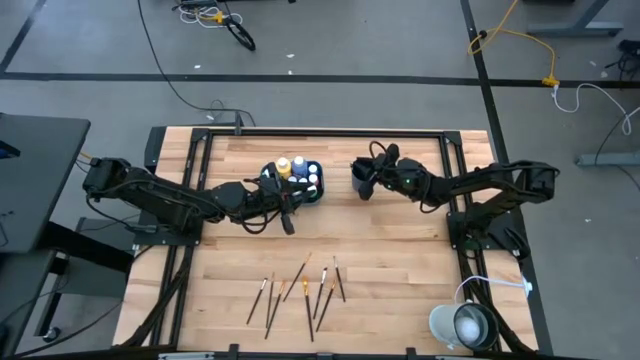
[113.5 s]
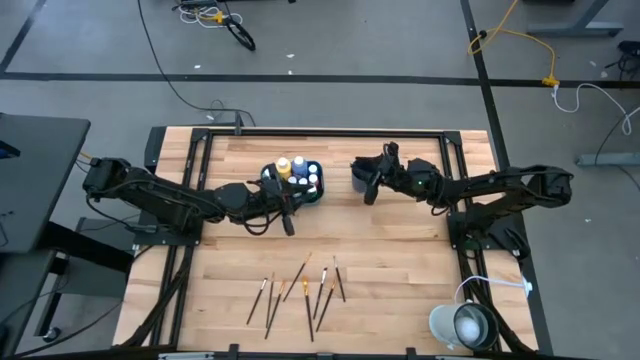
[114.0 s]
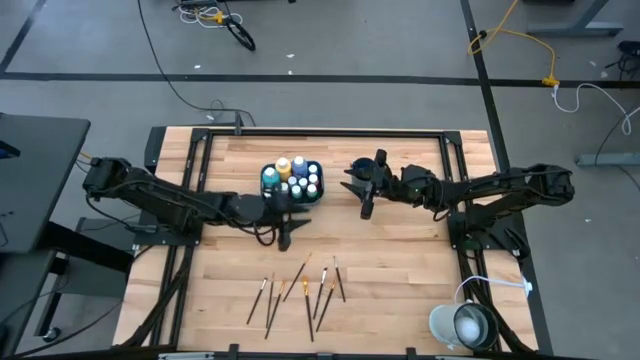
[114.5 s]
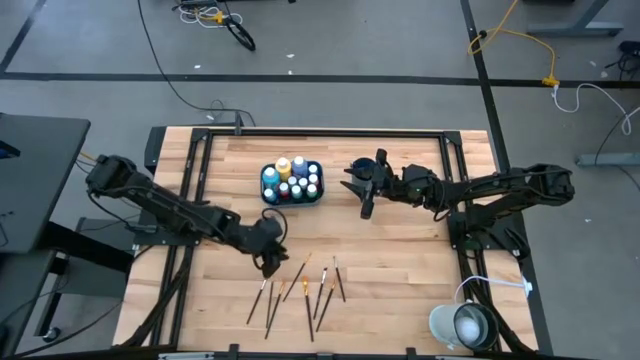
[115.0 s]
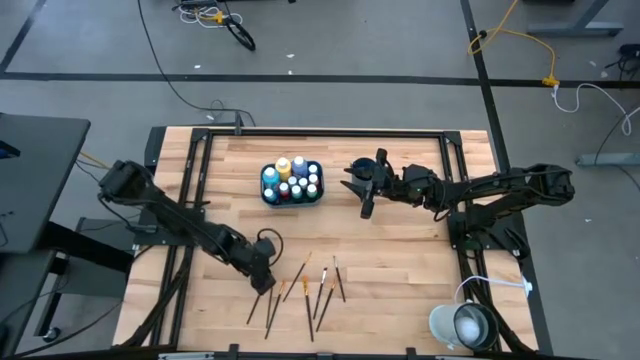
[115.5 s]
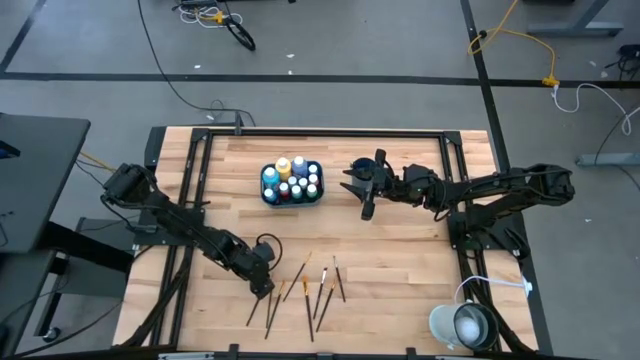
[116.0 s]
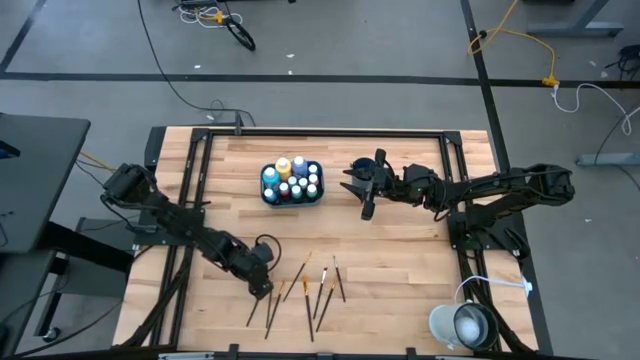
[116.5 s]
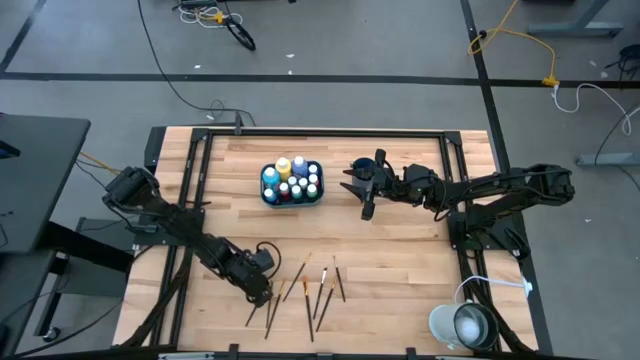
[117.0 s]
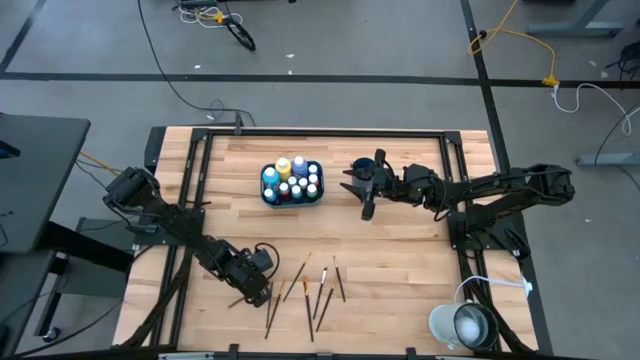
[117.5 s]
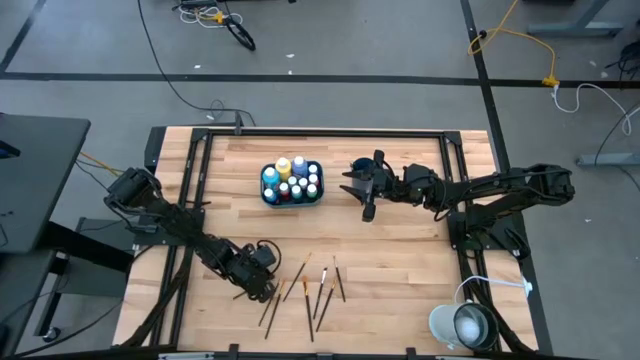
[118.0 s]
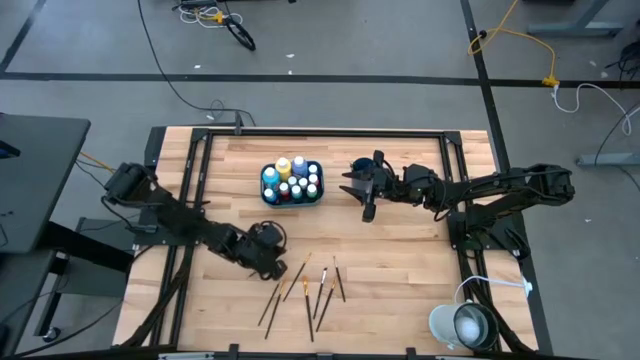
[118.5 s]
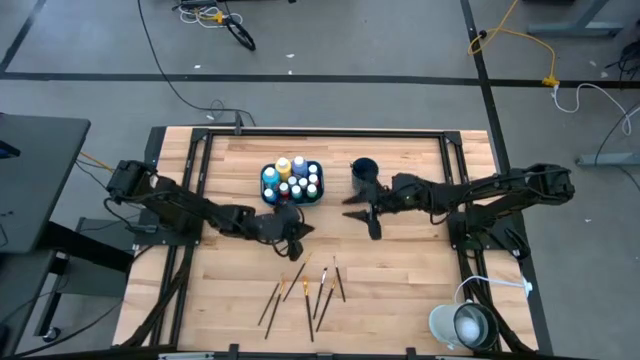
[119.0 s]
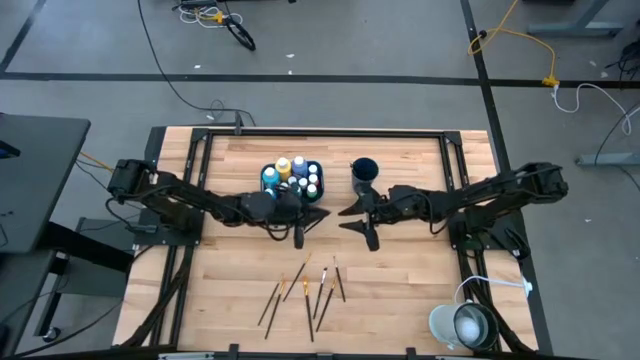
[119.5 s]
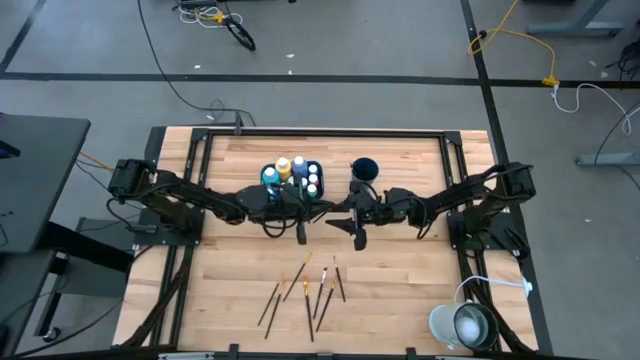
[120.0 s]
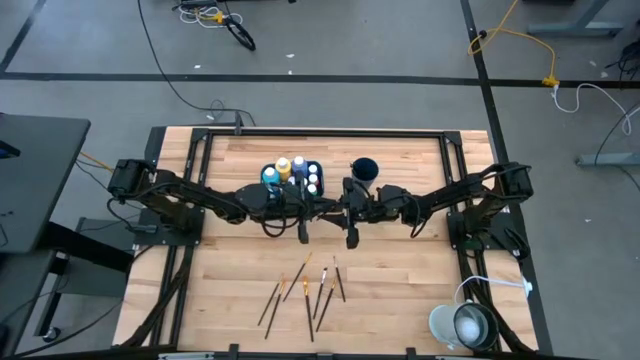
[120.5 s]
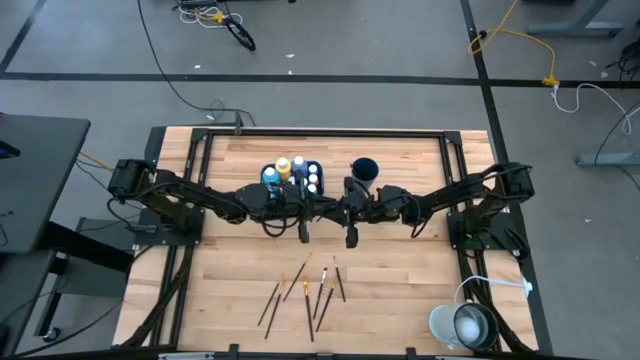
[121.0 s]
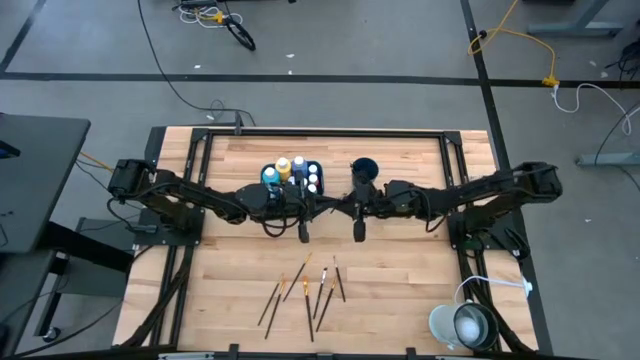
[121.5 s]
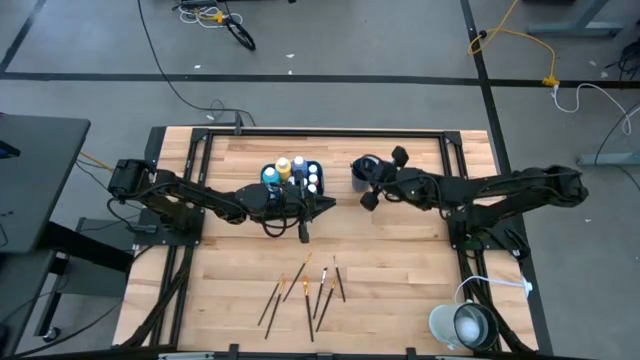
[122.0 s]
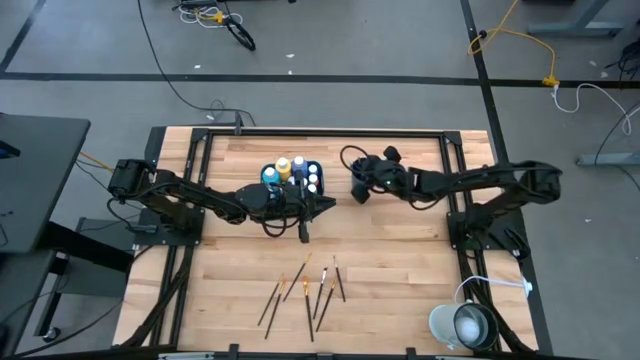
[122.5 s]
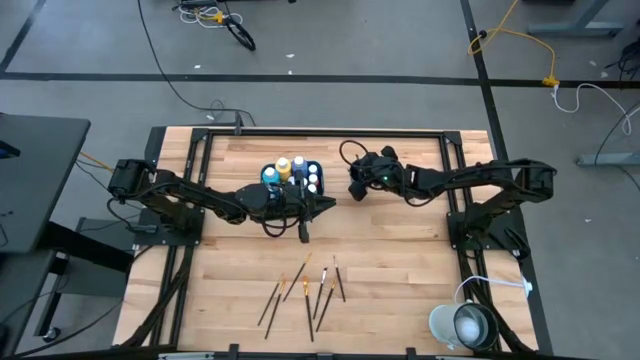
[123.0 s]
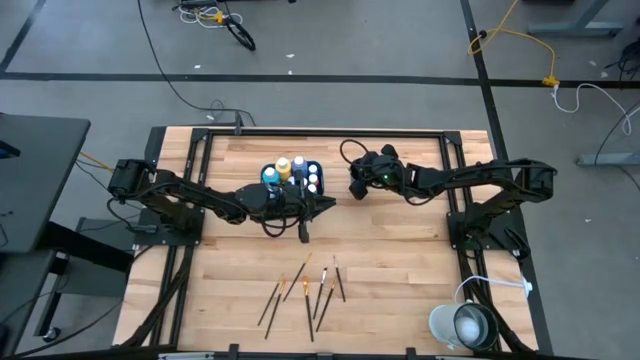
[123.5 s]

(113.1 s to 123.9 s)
Task: Pick & Place Paint Supplies
Put the silver paint brush into the blue cup

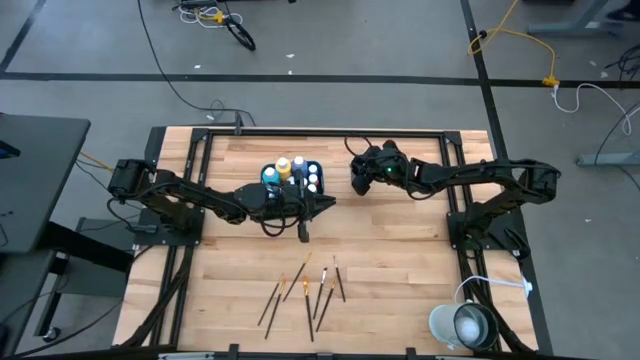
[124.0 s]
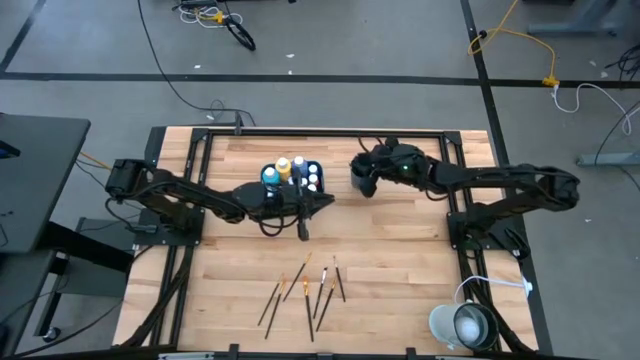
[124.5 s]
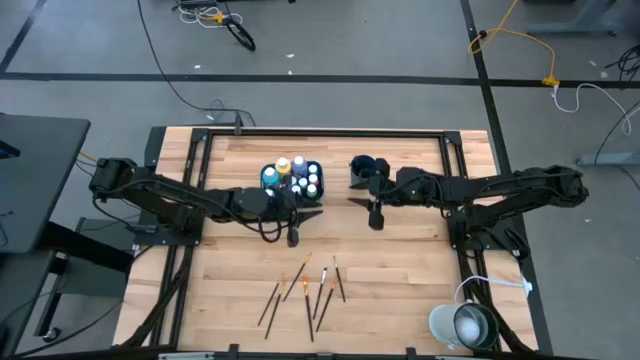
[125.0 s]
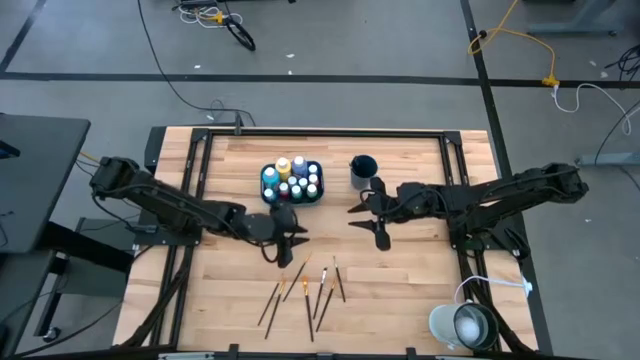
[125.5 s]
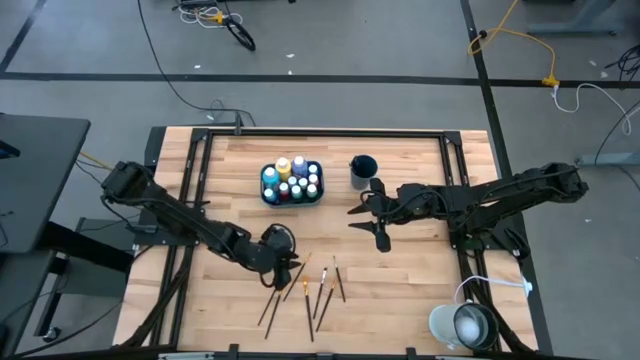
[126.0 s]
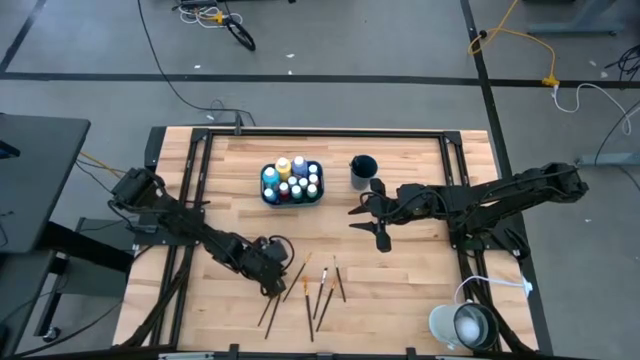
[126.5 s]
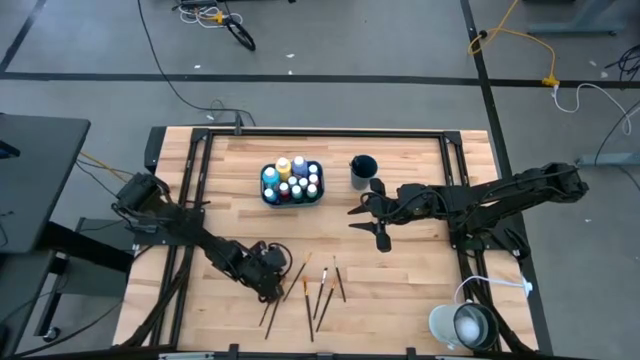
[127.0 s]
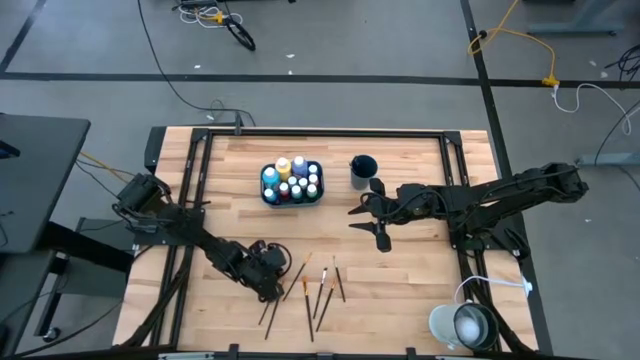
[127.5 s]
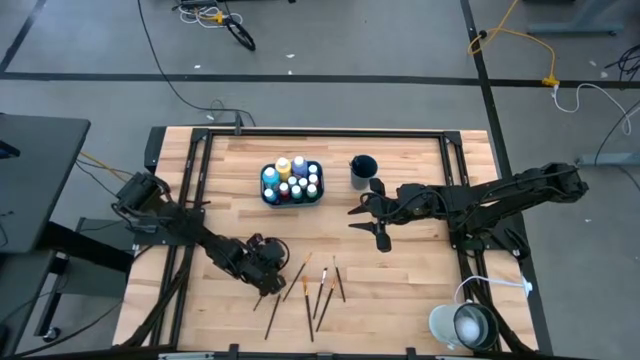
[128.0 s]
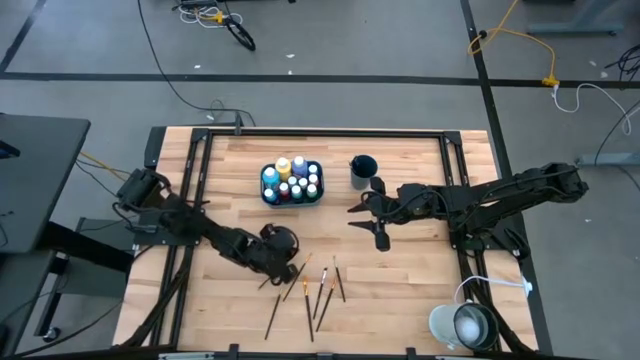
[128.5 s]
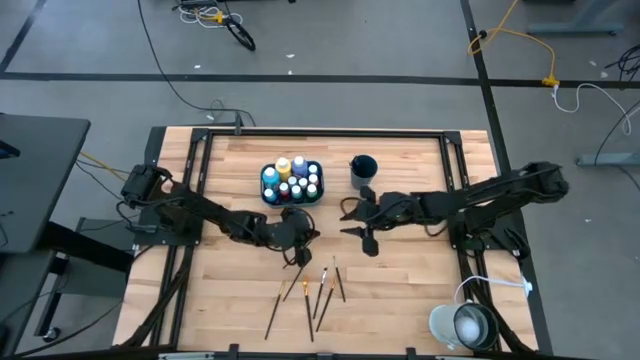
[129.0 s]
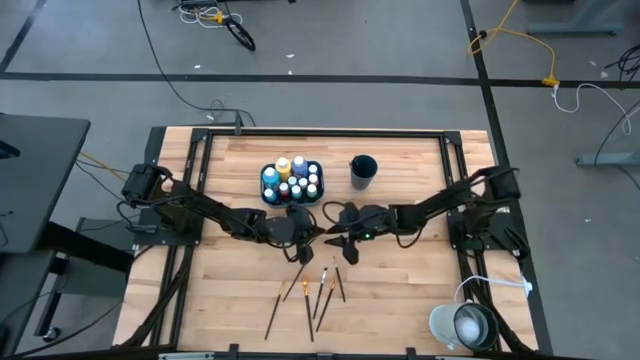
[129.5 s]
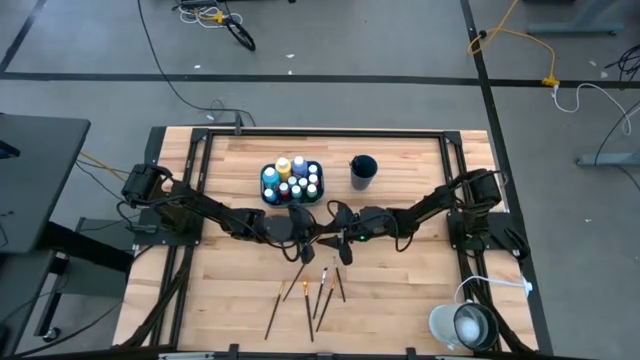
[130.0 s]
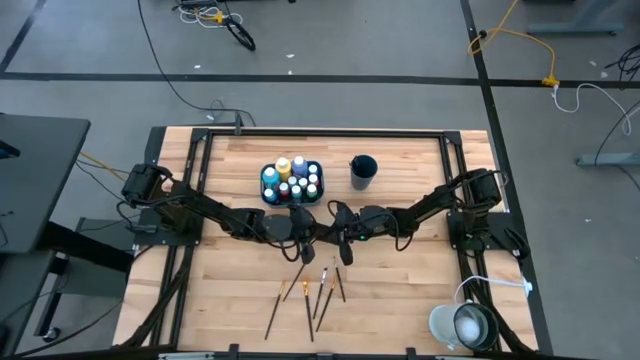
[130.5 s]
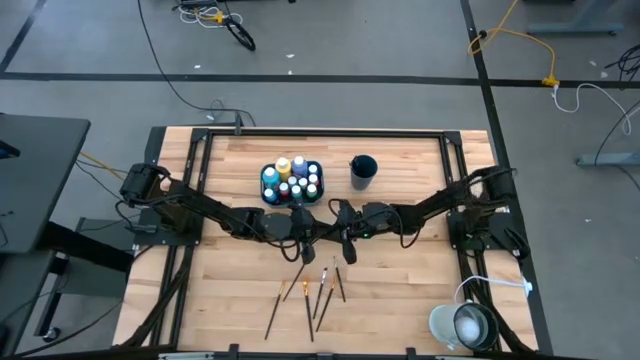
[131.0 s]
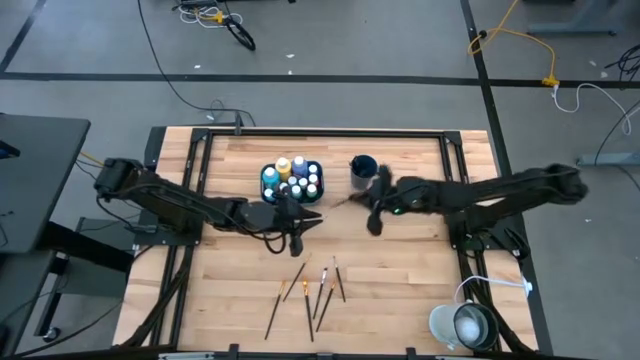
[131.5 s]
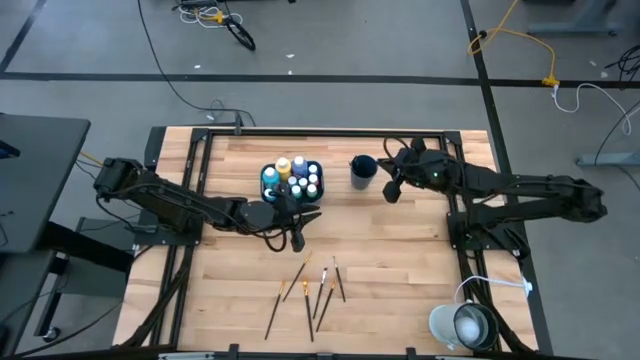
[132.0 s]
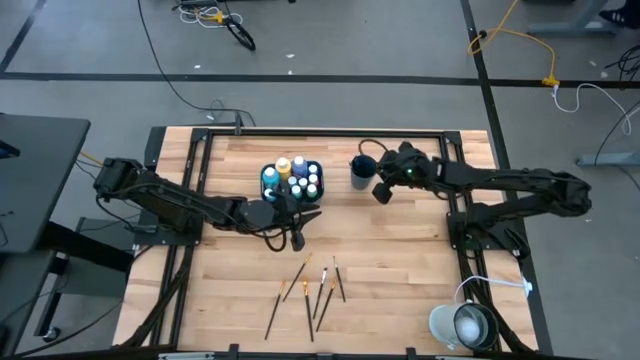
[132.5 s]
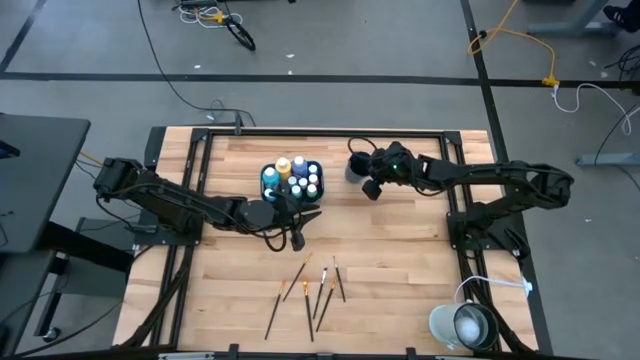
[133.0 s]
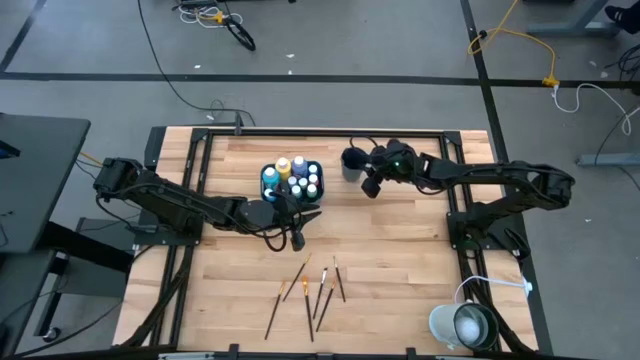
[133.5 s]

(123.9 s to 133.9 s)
Put the gold paint brush into the blue cup
